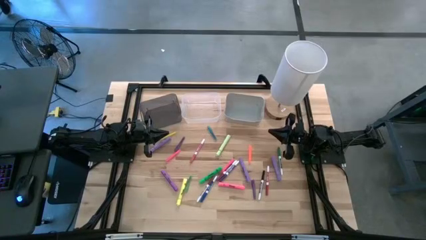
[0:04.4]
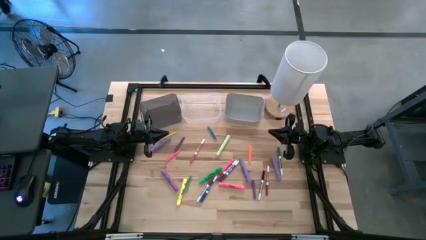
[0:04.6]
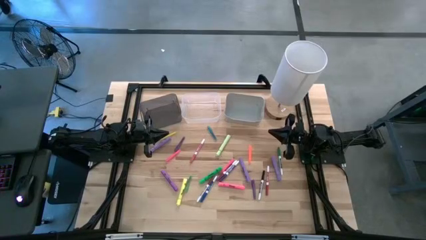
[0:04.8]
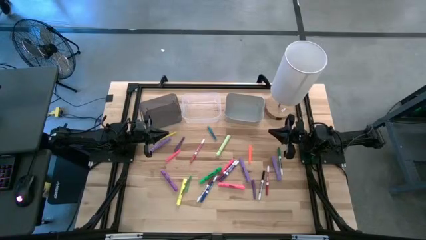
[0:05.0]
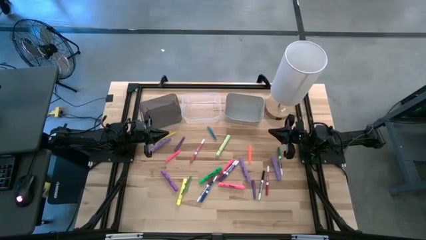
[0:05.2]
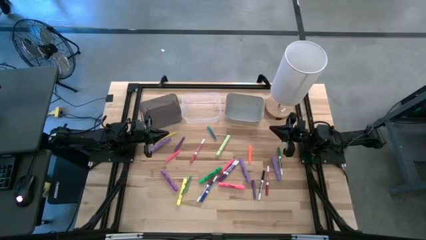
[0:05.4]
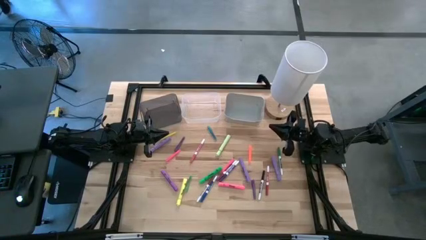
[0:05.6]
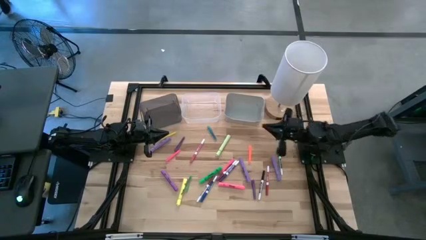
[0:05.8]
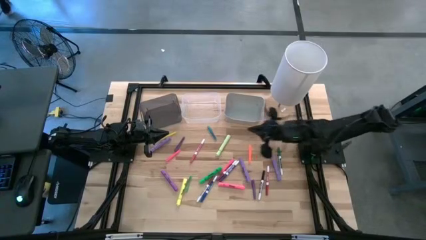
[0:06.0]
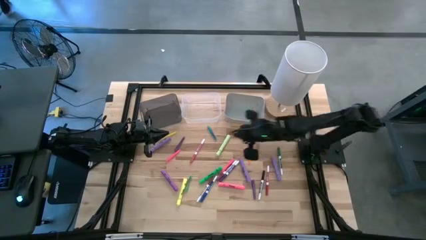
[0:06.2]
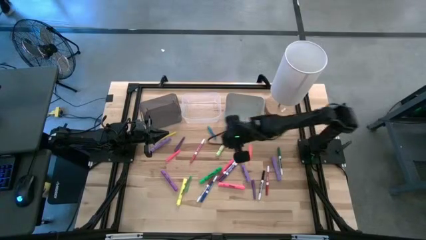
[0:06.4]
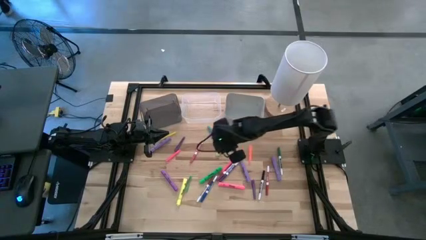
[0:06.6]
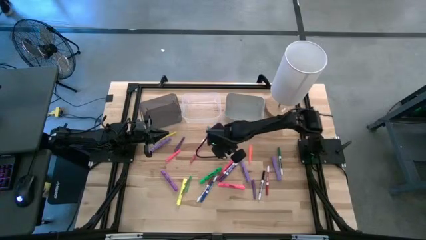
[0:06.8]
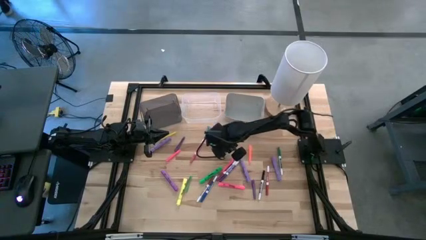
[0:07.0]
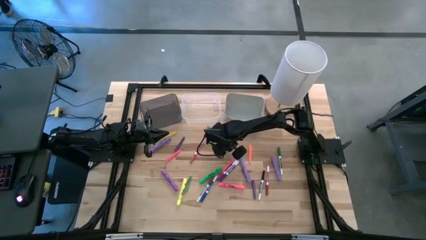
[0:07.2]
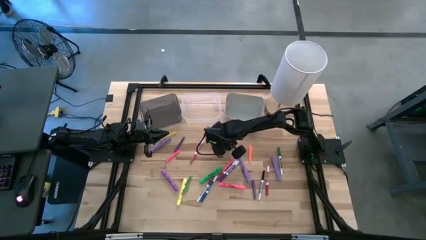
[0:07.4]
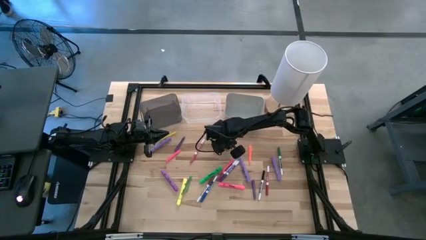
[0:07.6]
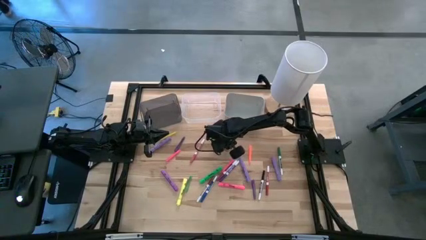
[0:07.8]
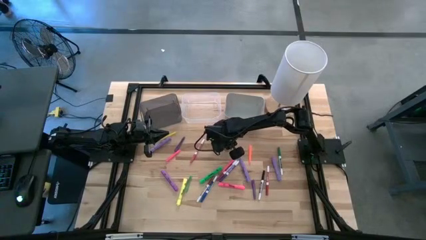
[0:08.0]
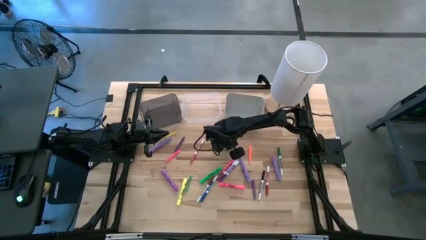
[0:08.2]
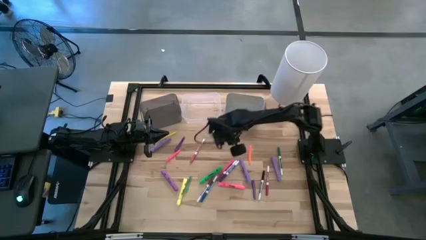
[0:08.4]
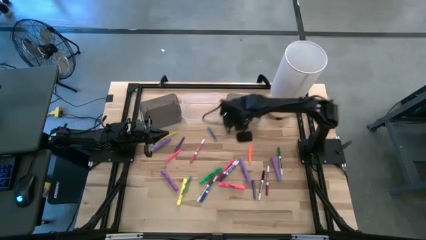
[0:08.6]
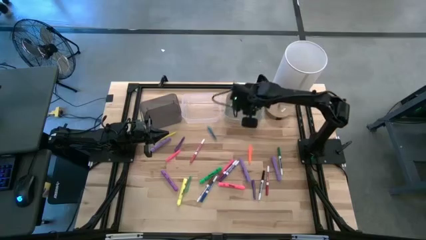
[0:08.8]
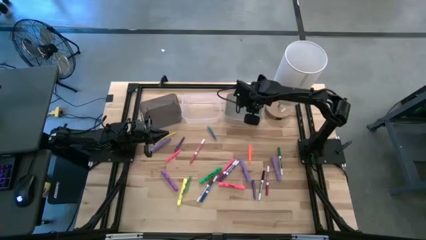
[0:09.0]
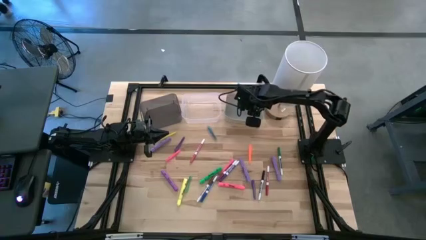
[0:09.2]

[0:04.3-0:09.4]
Task: Pick & Place Markers
Put the yellow highlighter pen into the gray bin

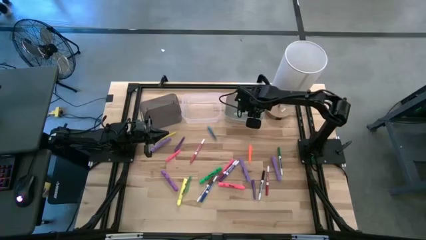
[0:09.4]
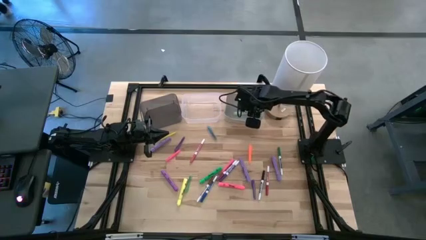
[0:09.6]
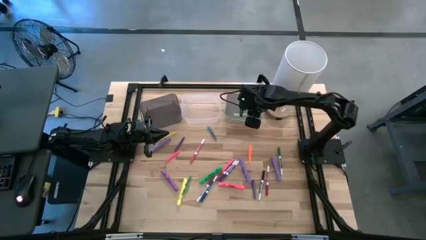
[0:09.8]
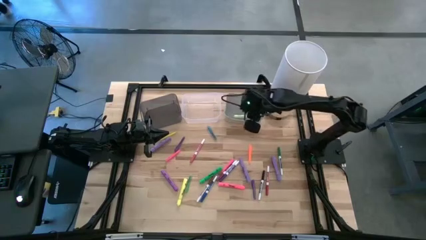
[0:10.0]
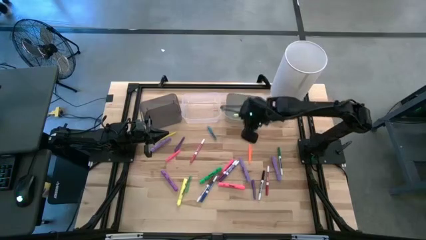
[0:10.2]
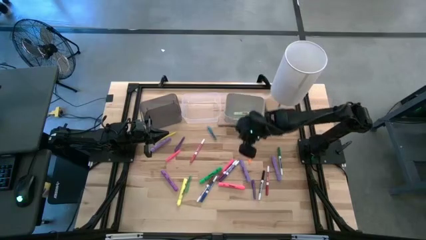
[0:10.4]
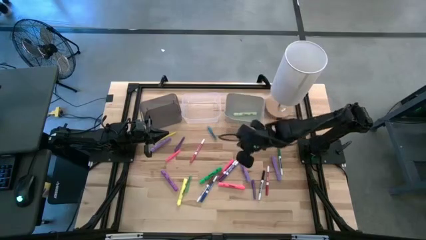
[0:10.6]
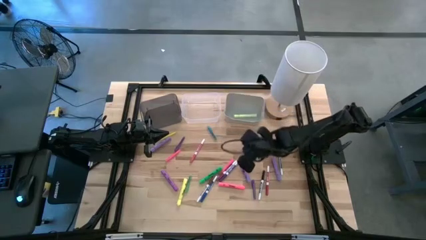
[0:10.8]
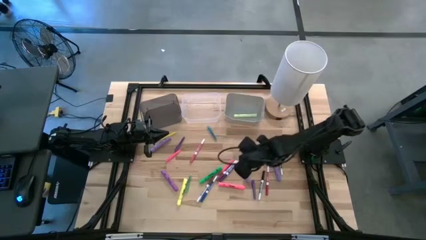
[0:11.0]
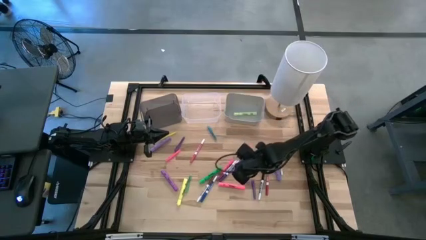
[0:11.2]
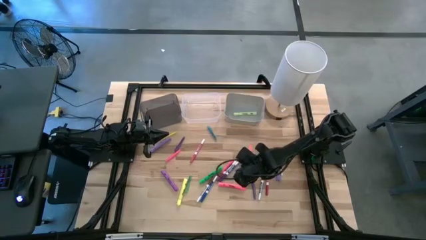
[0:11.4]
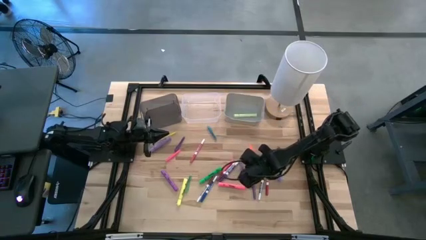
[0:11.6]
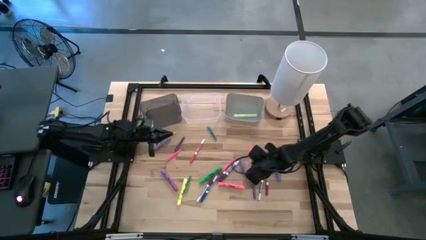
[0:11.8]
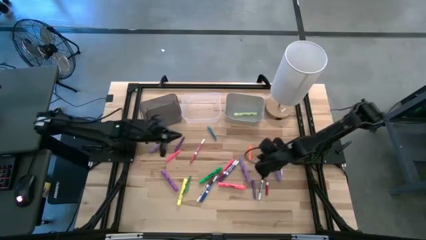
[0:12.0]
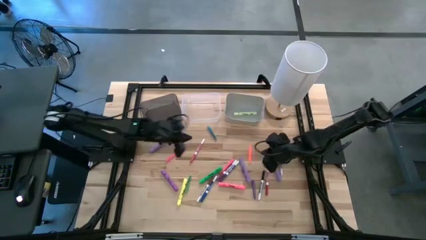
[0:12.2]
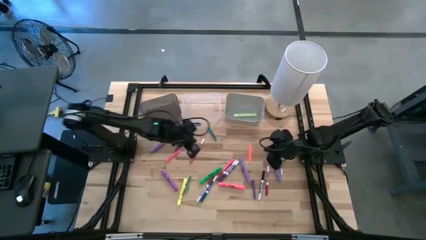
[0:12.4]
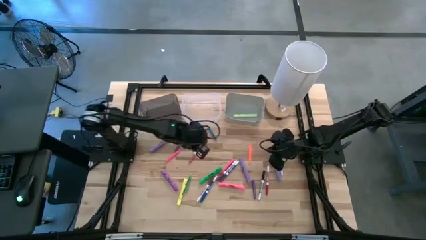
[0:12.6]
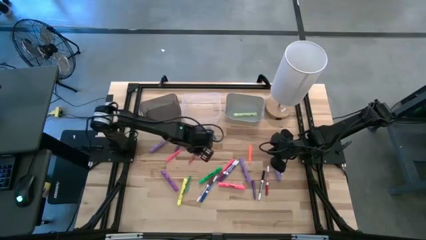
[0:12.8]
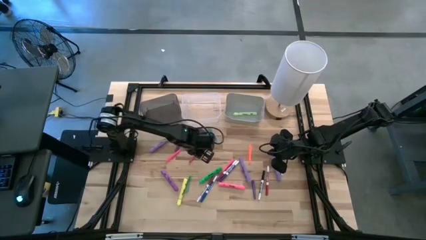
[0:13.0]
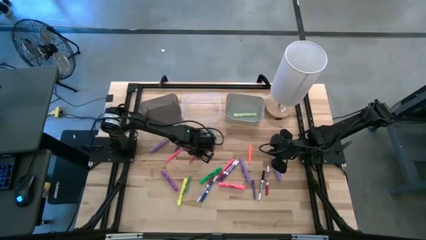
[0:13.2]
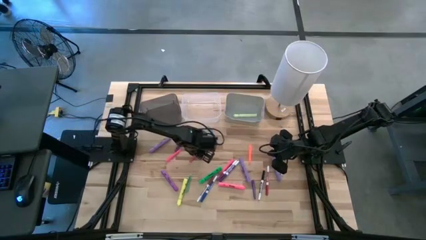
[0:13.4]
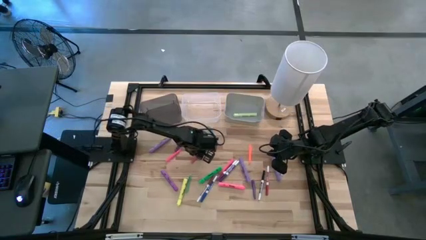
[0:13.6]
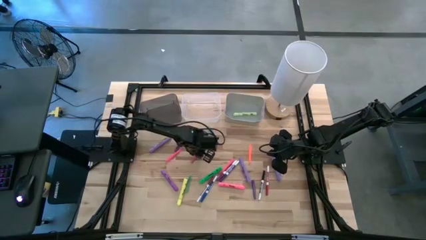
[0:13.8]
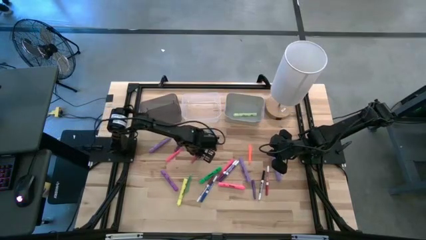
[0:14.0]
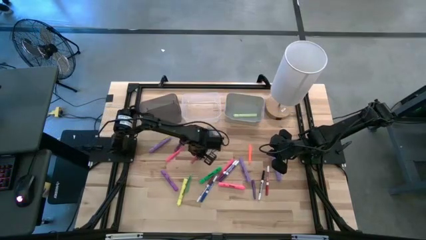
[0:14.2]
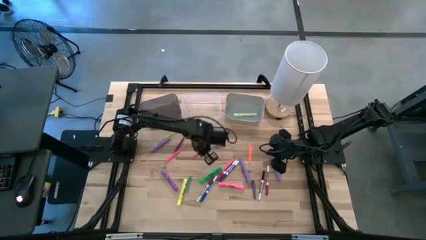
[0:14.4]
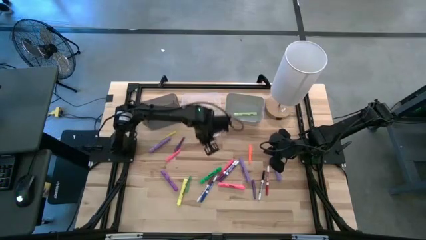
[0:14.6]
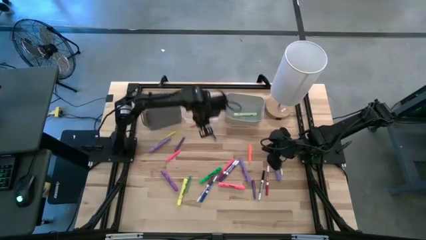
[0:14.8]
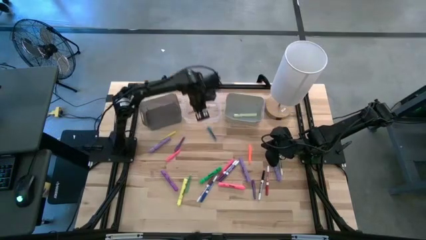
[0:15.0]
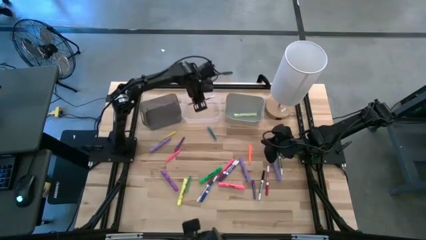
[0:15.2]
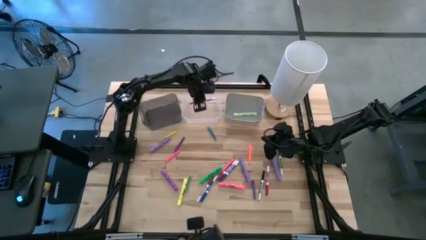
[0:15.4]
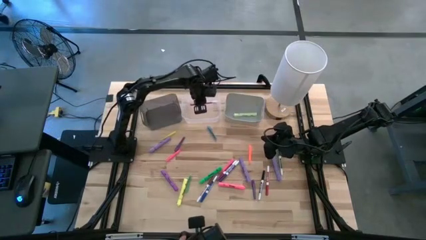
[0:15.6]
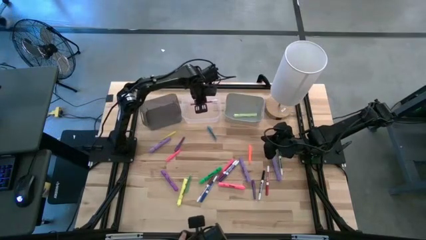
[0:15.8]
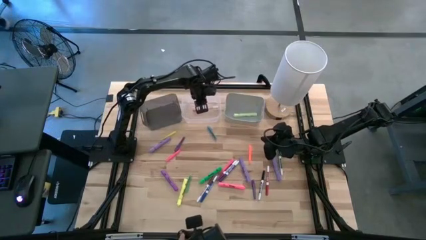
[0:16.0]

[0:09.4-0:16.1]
Put the pink marker pen into the transparent bin

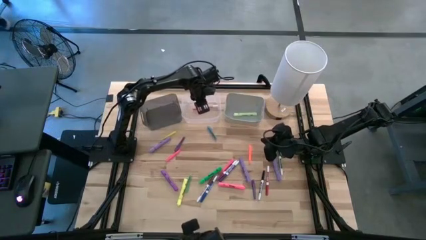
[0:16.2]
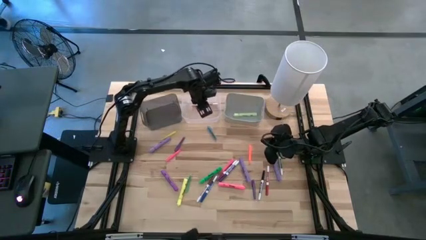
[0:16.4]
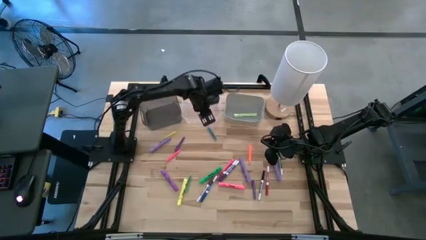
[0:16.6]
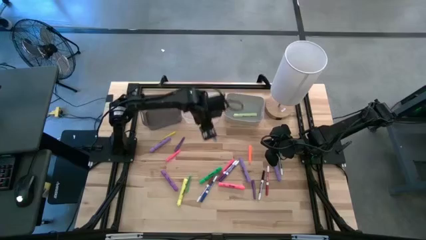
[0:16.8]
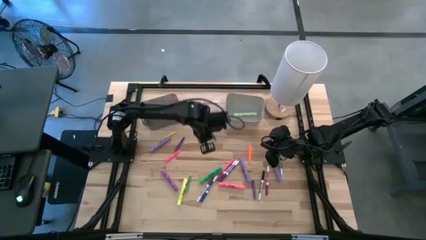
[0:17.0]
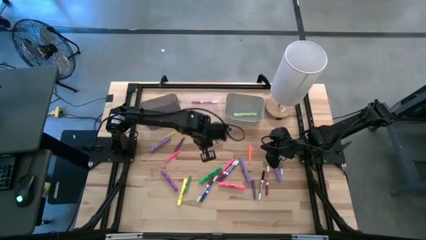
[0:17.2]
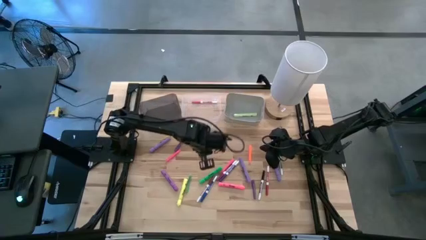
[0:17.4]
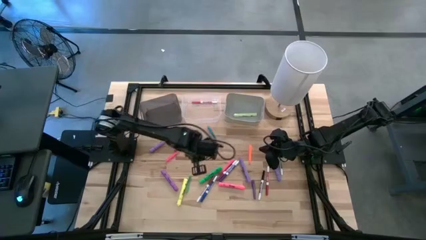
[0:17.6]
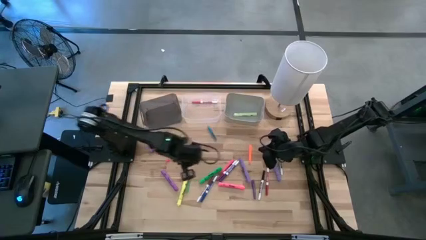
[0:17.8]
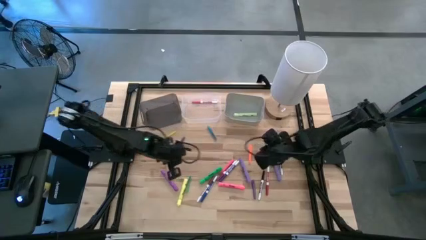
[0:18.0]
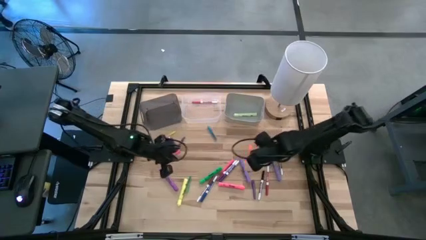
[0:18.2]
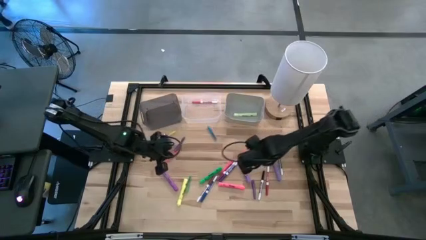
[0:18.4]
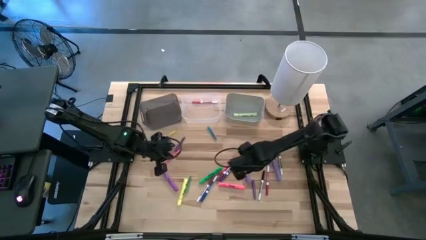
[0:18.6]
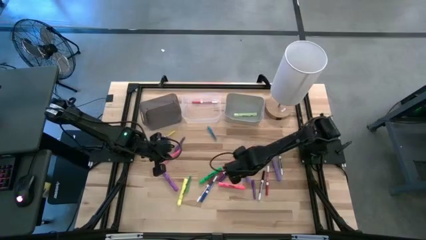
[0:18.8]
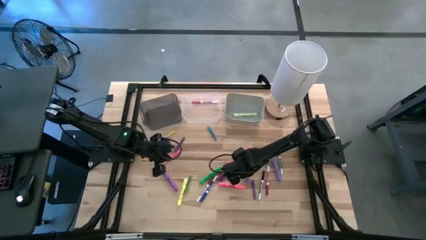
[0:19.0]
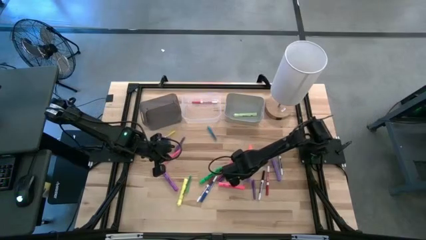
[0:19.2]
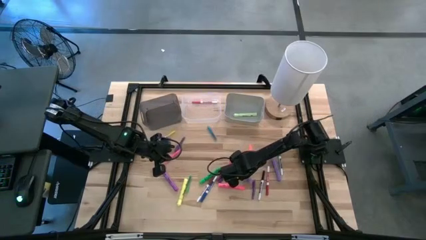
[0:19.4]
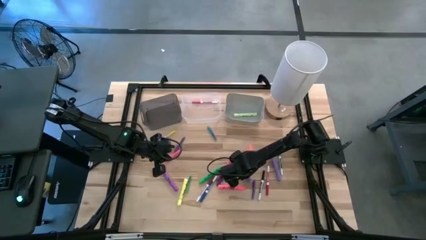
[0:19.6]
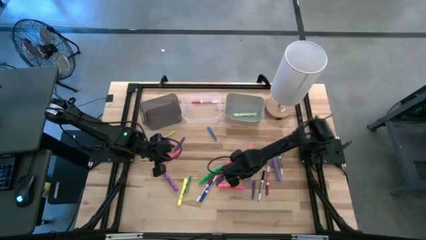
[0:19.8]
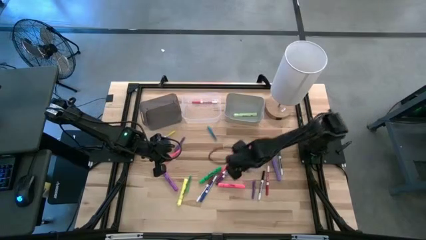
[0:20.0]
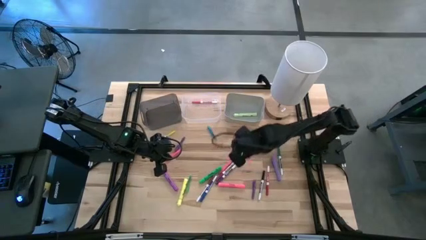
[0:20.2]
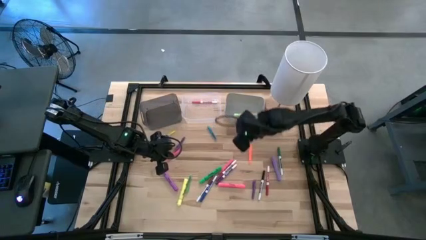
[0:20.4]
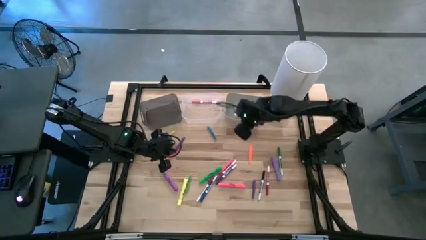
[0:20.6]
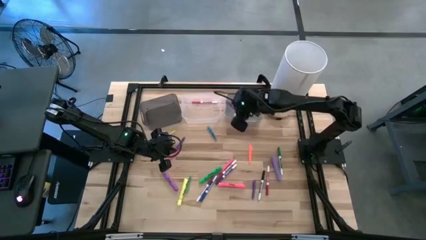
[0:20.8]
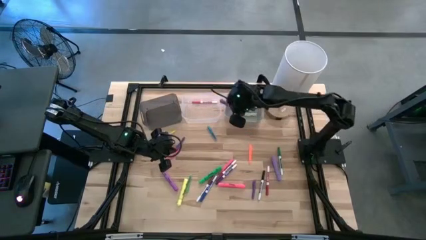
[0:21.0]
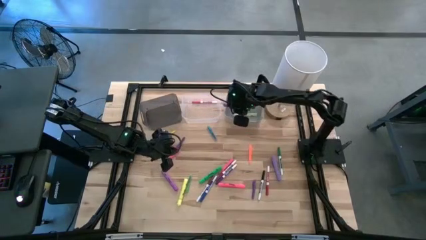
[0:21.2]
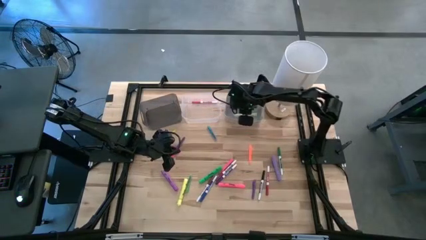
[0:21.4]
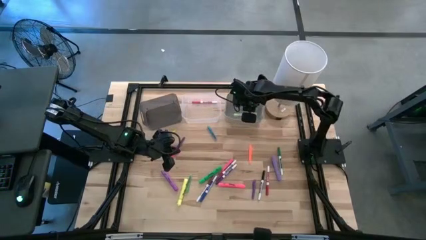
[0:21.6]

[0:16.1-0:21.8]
Put the violet highlighter pen into the gray bin

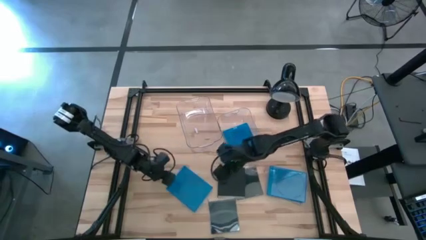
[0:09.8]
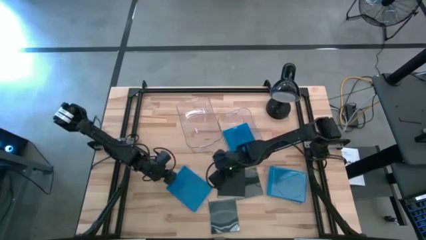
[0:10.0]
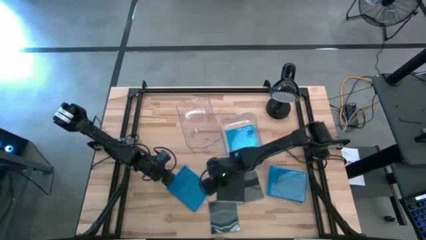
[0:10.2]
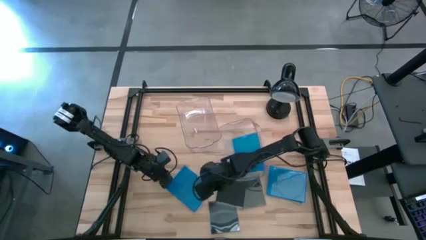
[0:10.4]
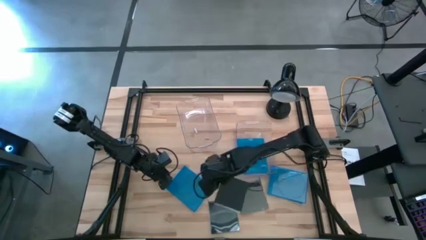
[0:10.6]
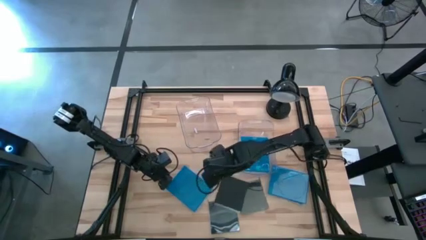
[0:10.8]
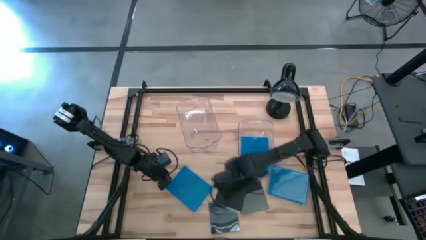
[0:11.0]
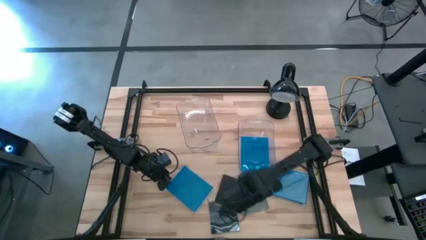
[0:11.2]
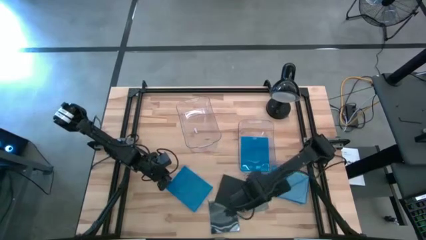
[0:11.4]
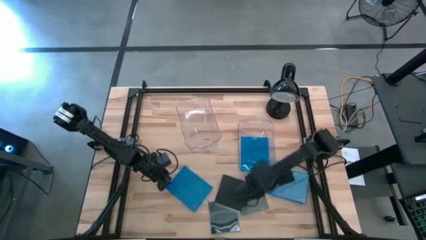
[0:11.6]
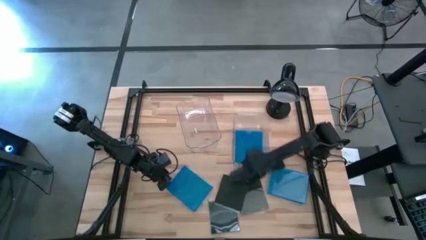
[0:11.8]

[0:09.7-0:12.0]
Task: Pick & place jewel cases by type
Adjust the right transparent bin
